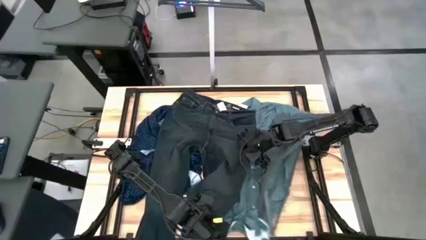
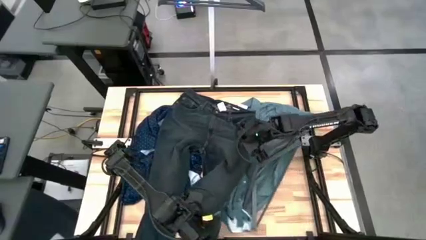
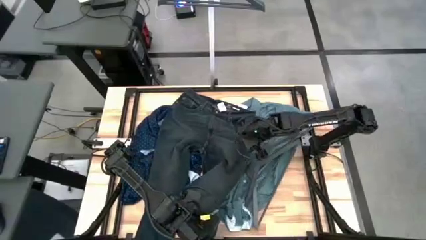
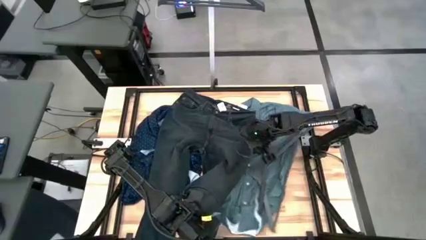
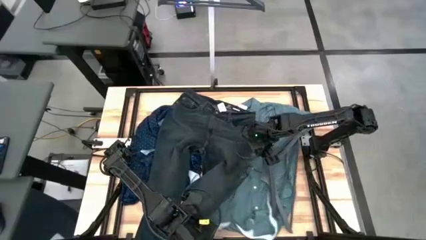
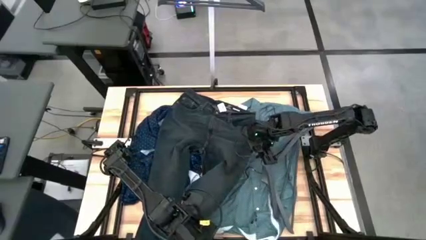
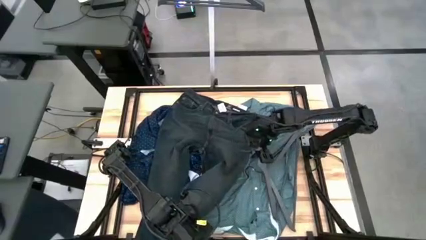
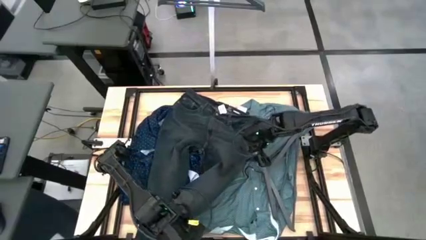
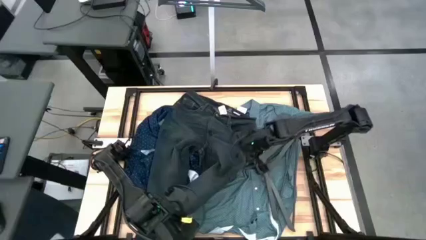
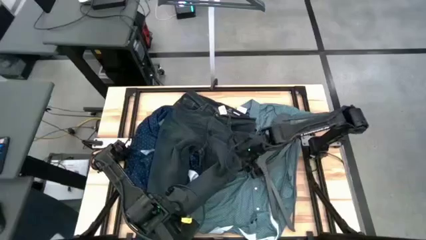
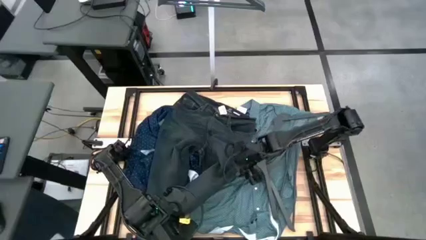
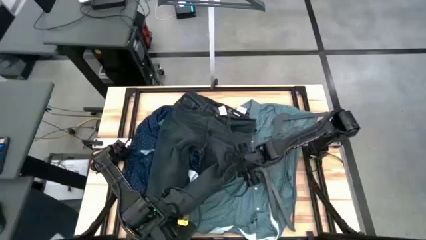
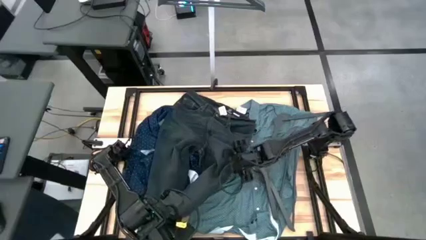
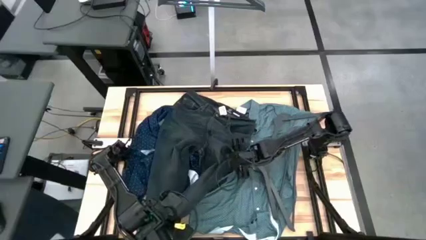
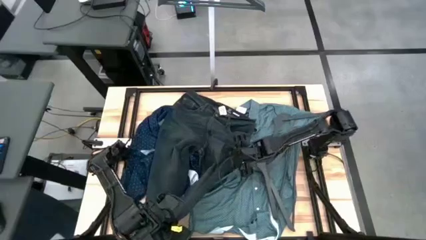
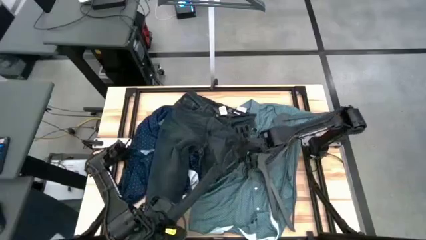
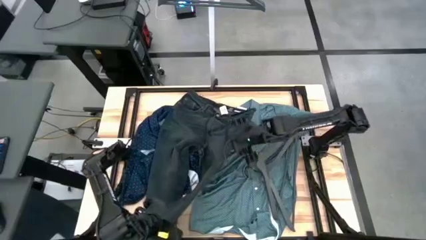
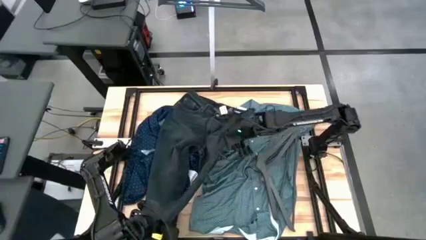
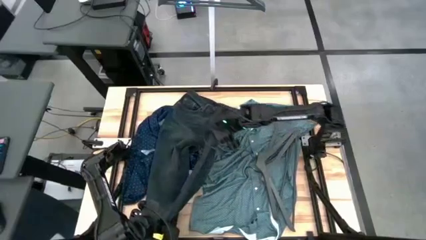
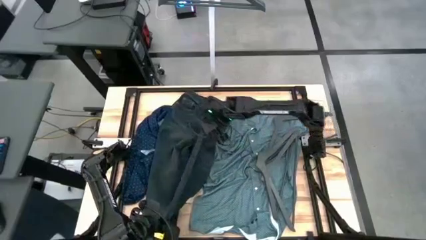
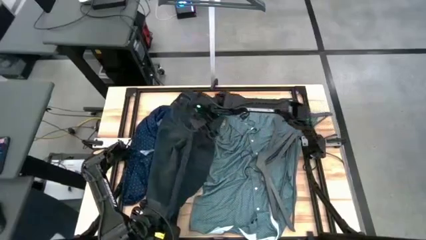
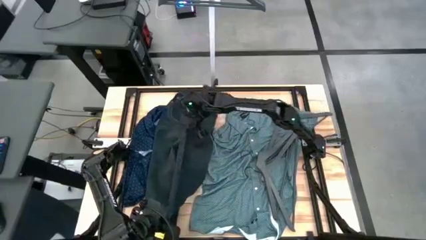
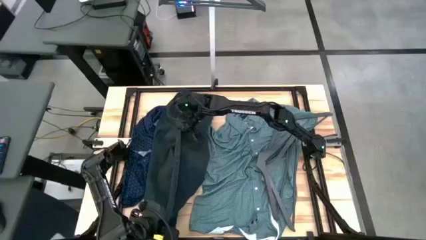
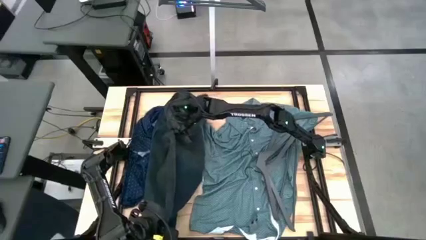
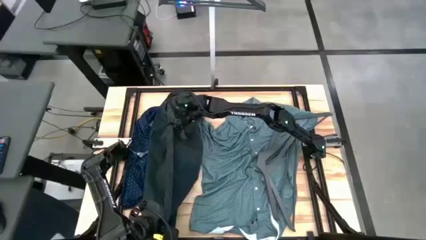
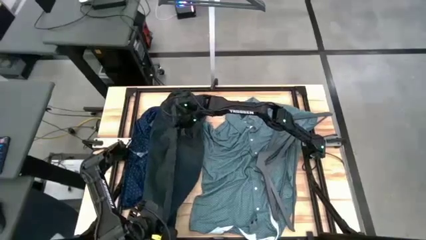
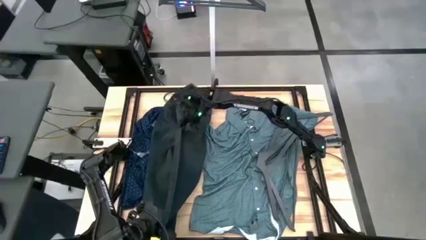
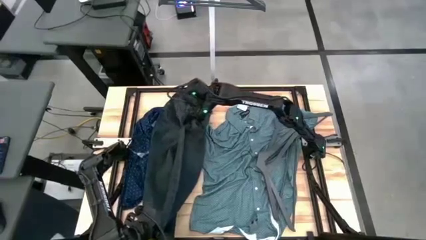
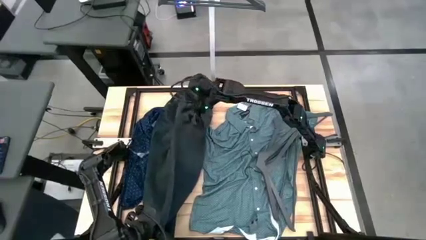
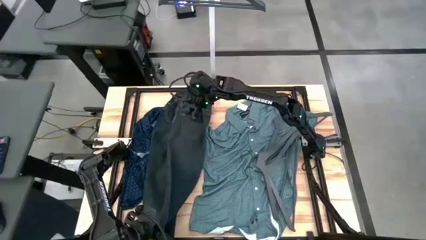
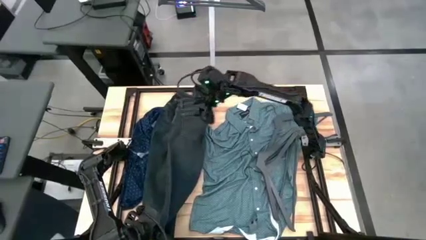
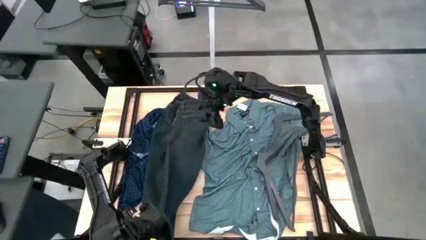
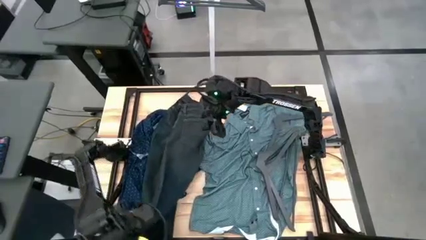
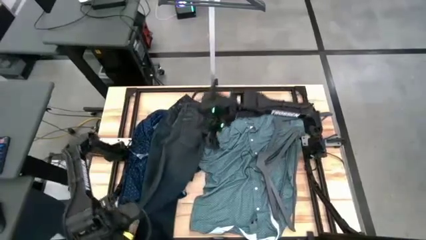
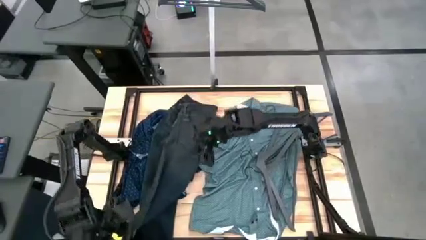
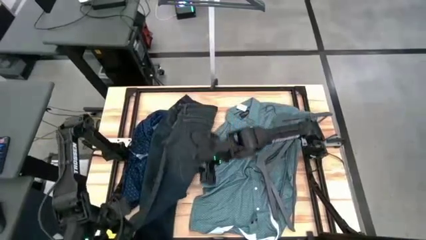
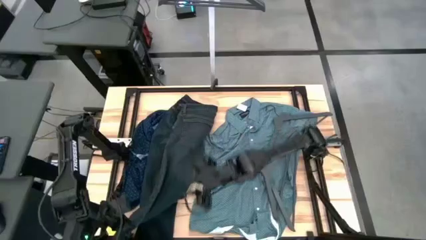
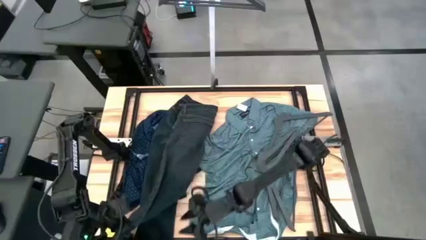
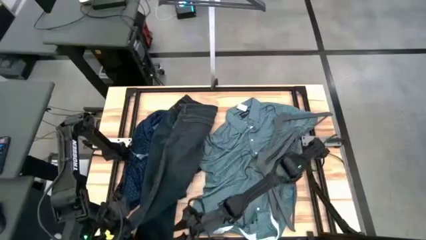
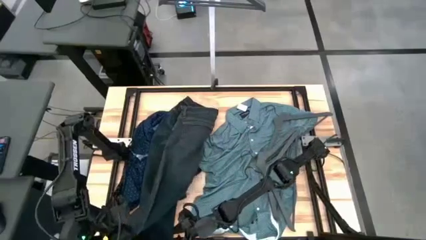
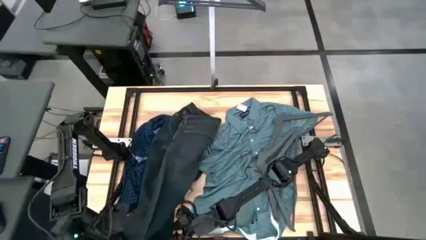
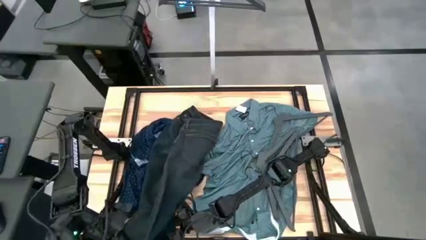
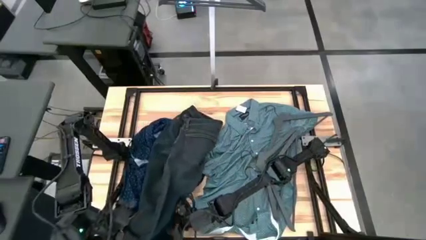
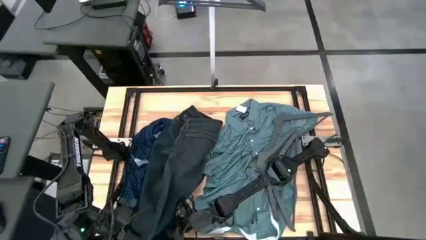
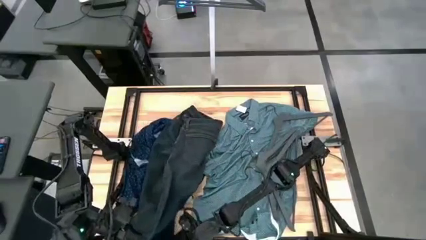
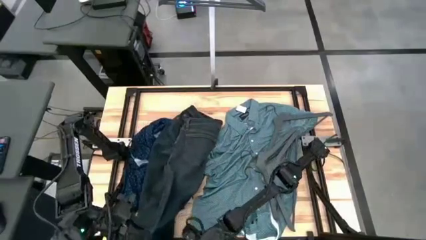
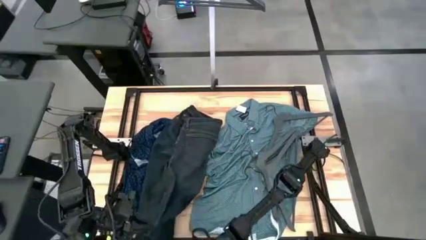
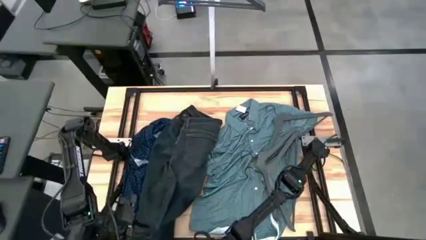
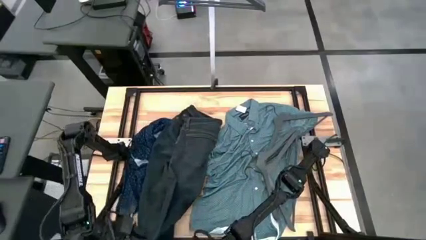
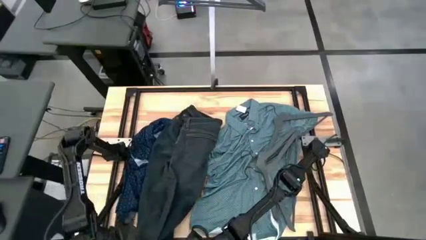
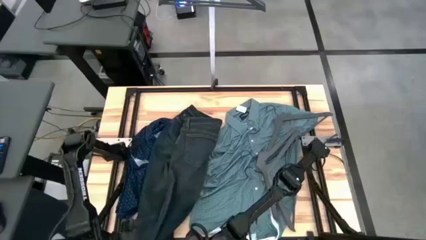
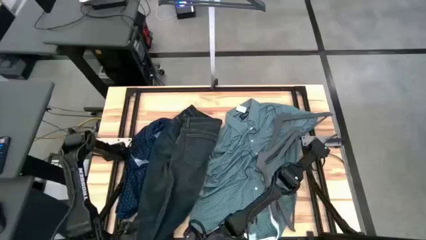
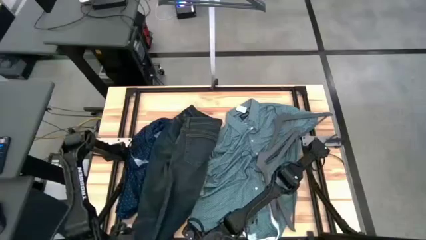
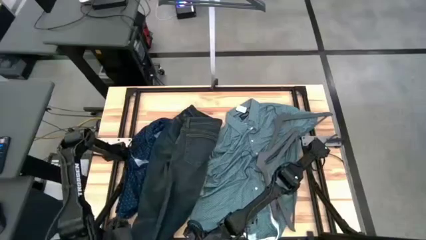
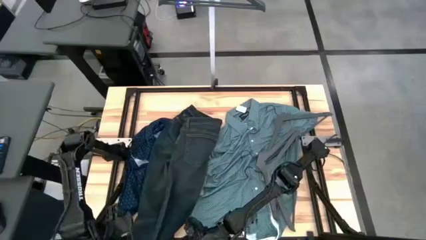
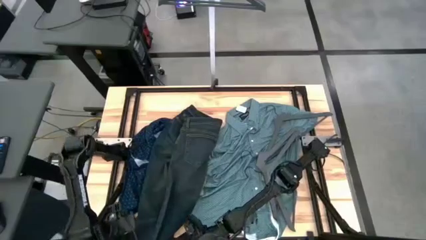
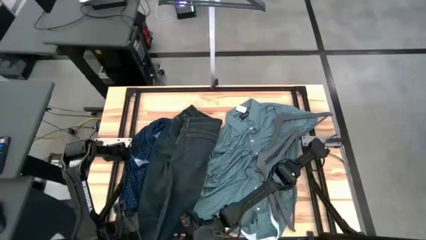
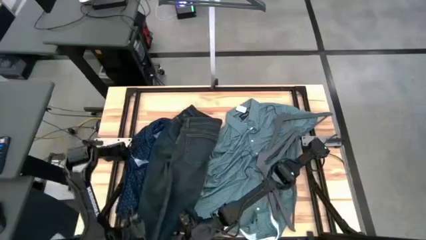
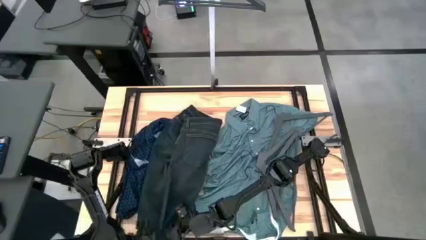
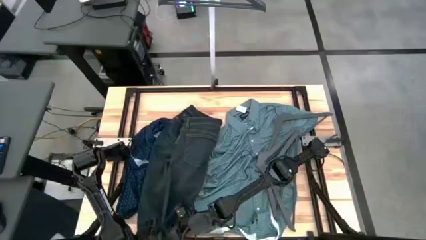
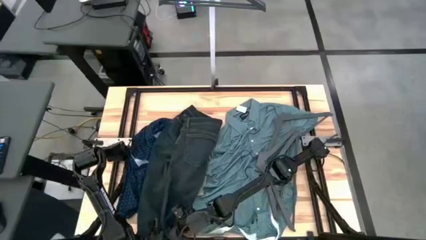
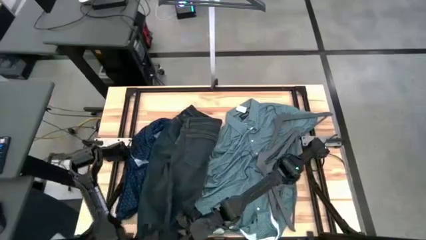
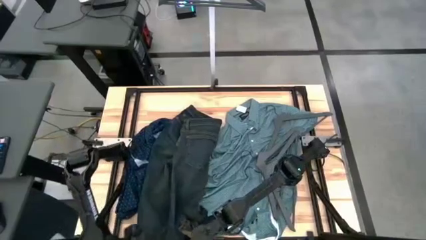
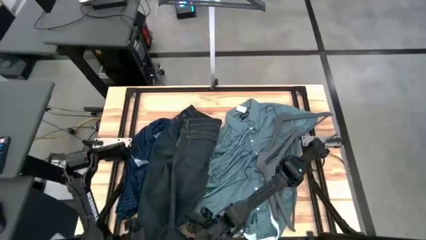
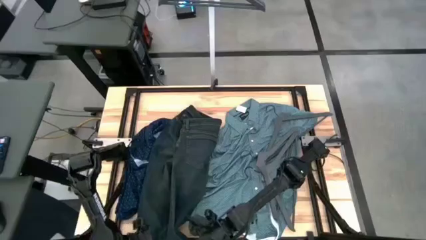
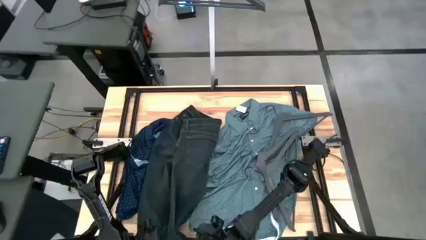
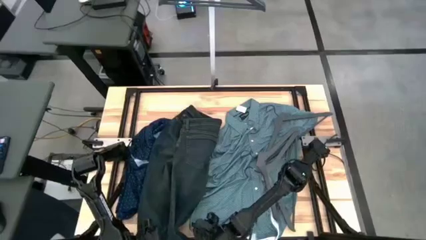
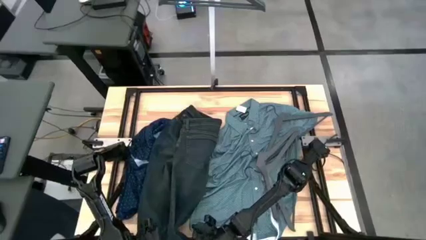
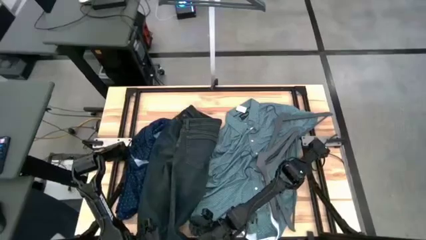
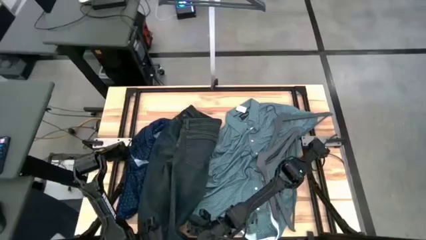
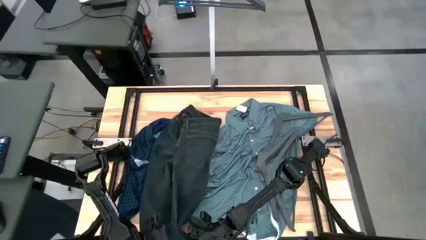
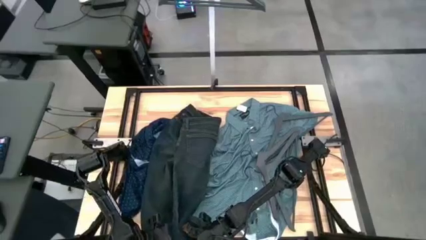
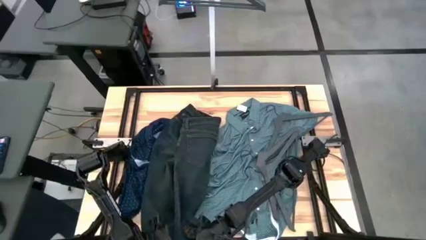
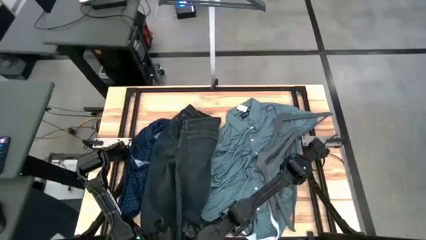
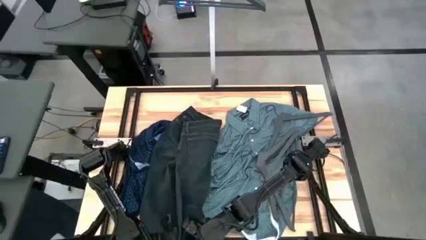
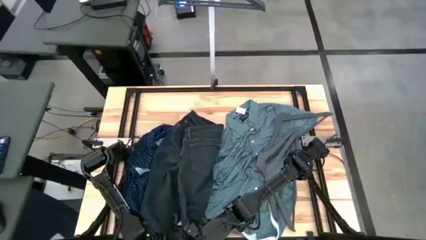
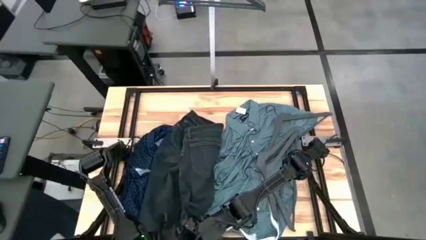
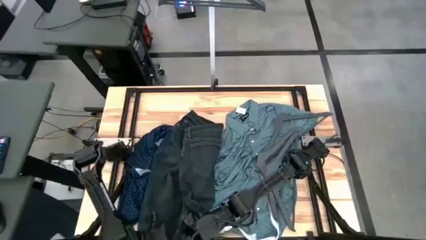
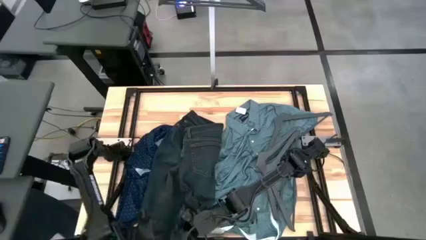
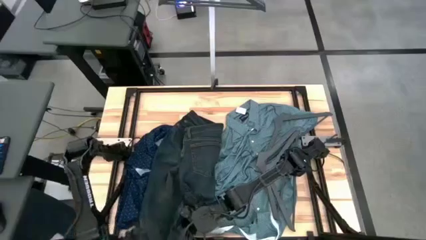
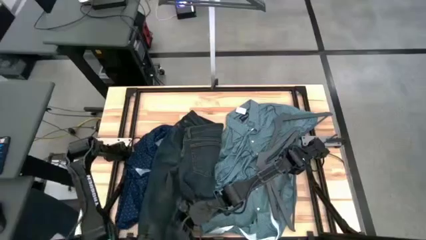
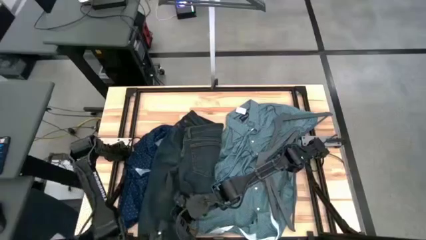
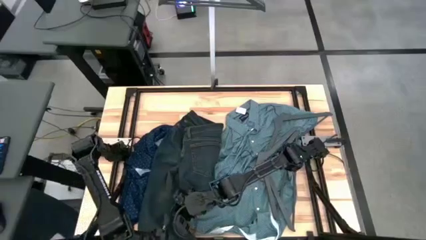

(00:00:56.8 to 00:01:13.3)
Task: Hang clothes
Hang the black pants on the rack

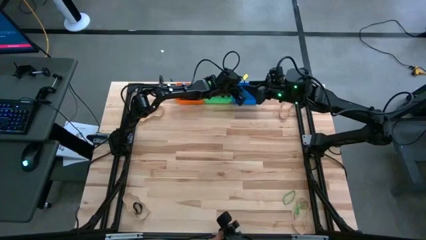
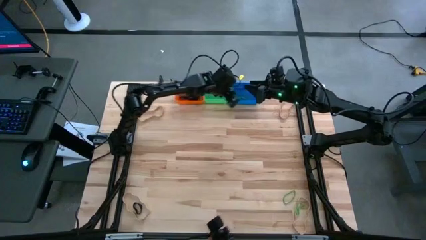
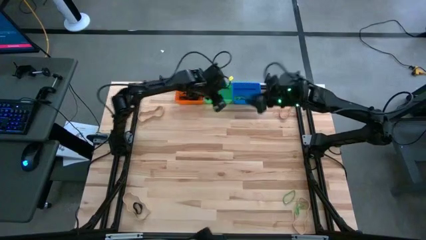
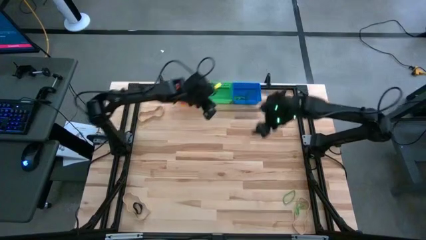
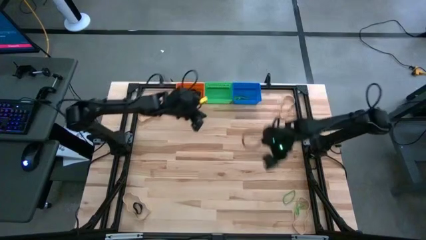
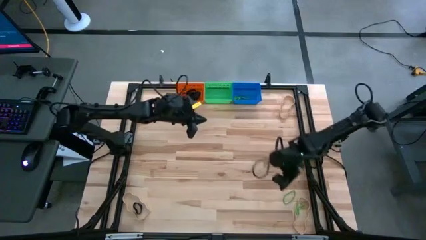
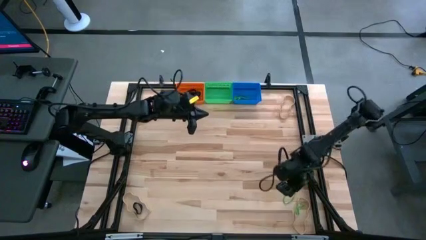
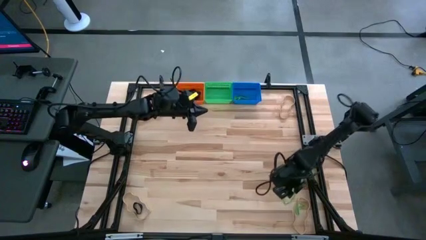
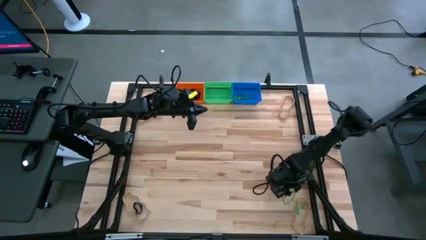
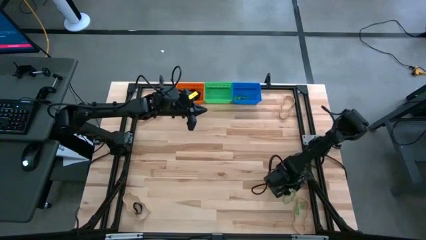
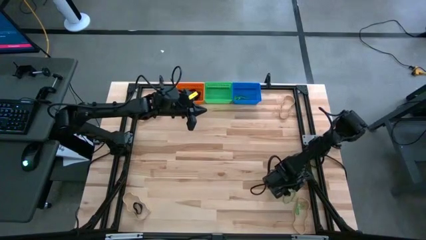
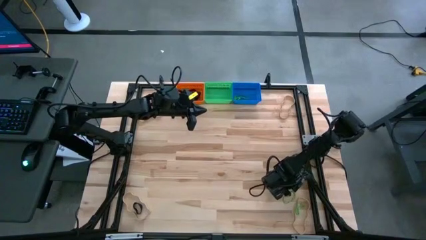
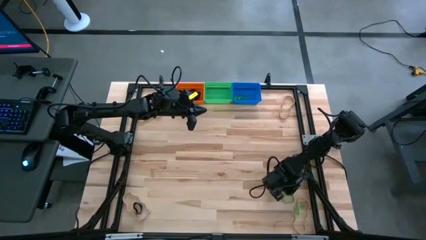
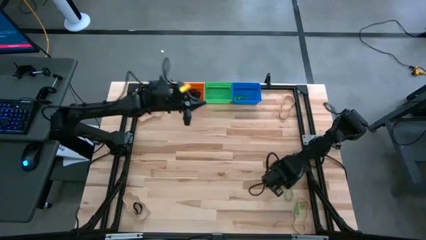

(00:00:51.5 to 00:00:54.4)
Task: Sort rubber bands into baskets
Put the green rubber band into the blue basket
